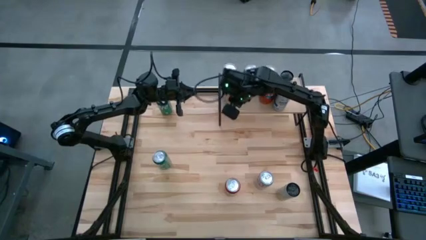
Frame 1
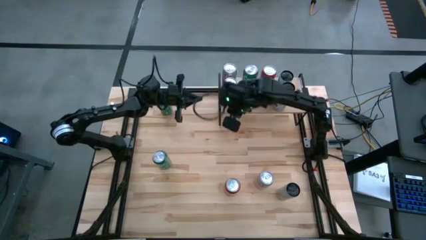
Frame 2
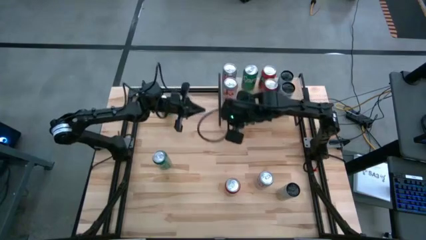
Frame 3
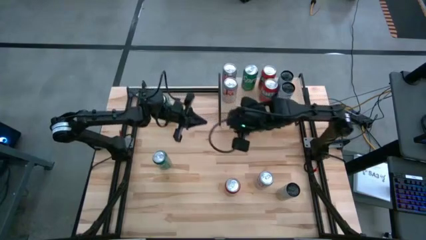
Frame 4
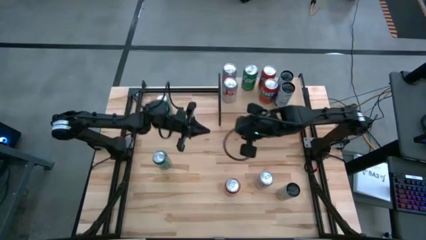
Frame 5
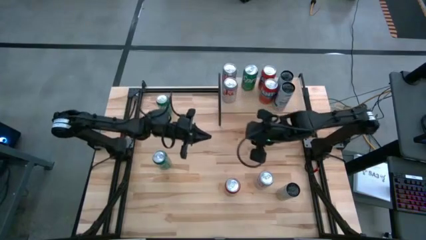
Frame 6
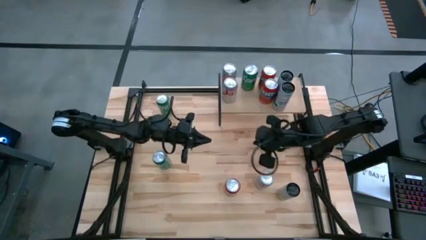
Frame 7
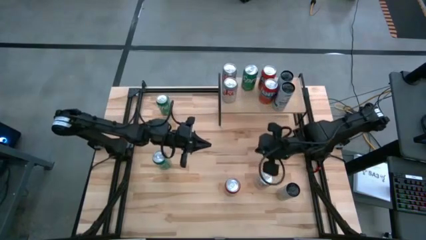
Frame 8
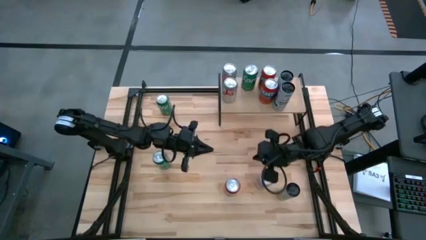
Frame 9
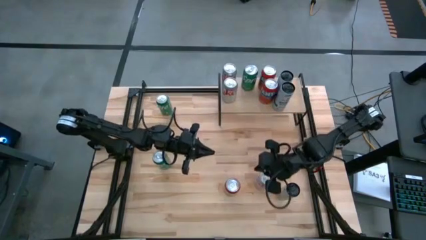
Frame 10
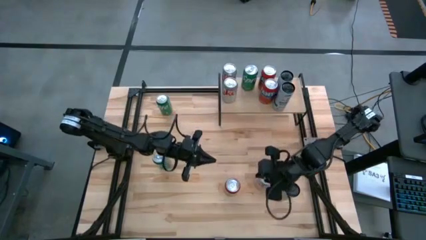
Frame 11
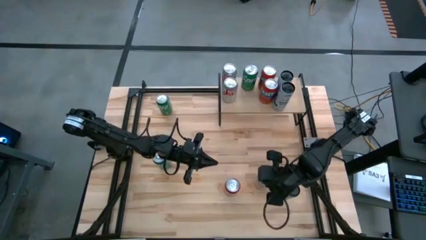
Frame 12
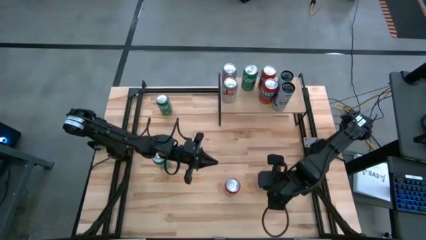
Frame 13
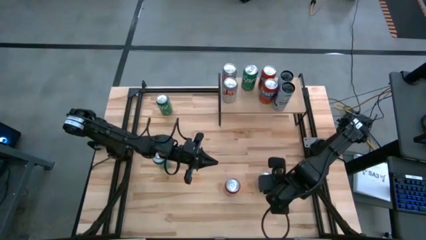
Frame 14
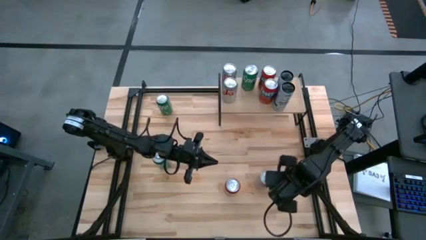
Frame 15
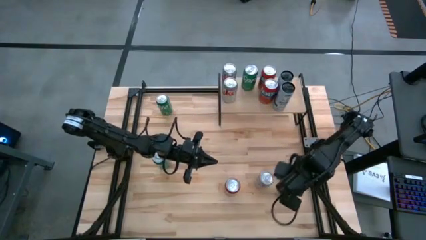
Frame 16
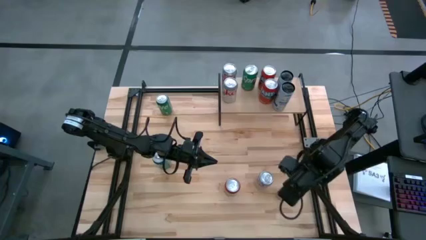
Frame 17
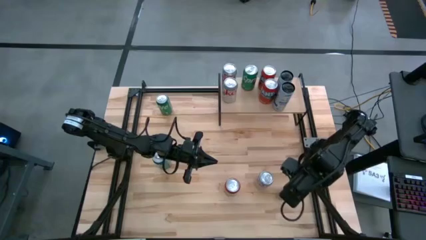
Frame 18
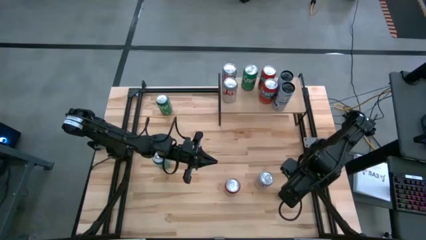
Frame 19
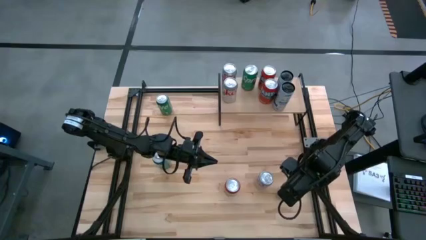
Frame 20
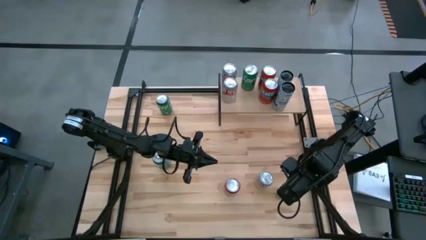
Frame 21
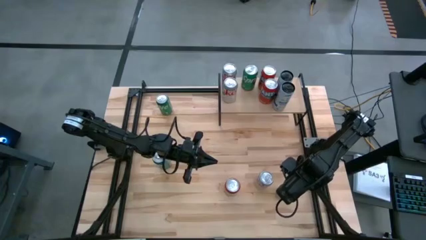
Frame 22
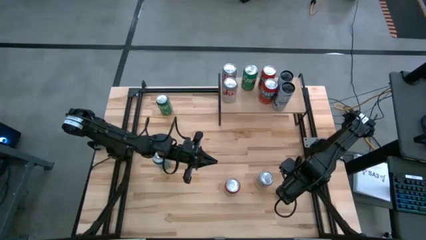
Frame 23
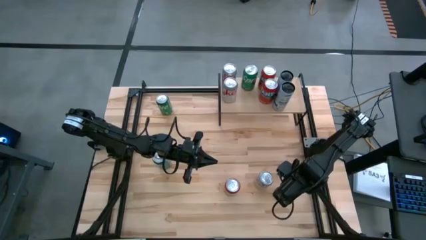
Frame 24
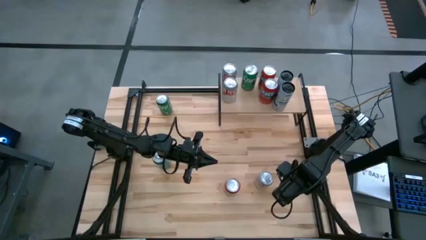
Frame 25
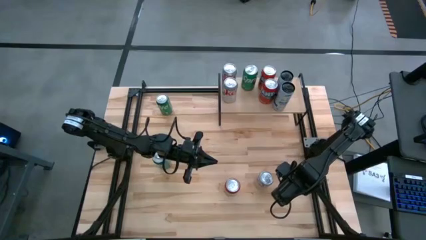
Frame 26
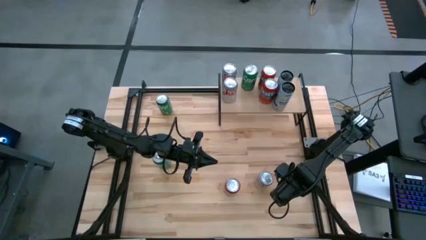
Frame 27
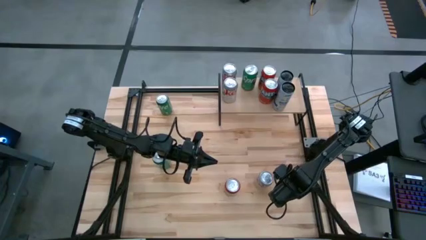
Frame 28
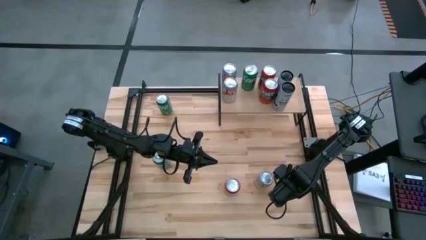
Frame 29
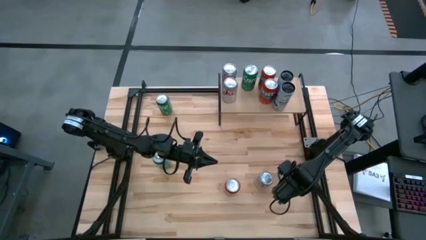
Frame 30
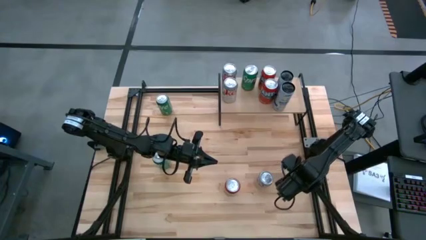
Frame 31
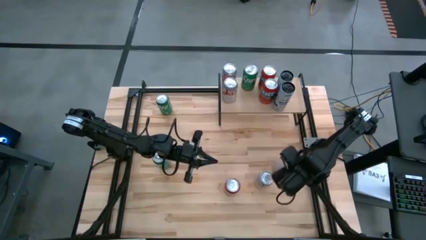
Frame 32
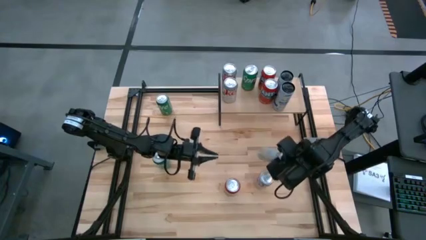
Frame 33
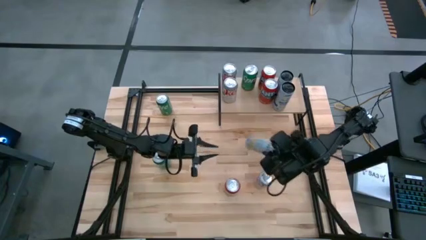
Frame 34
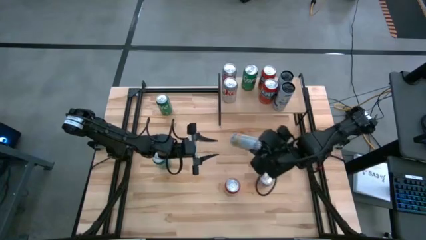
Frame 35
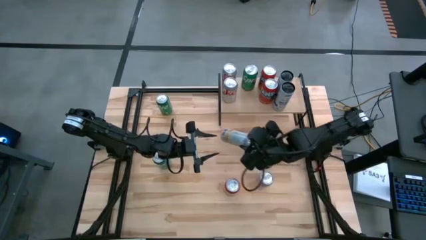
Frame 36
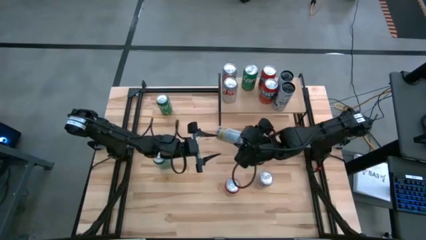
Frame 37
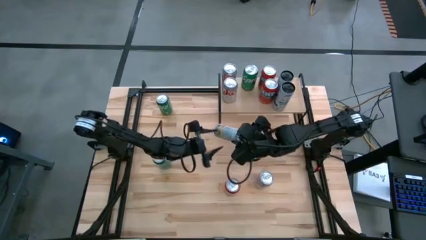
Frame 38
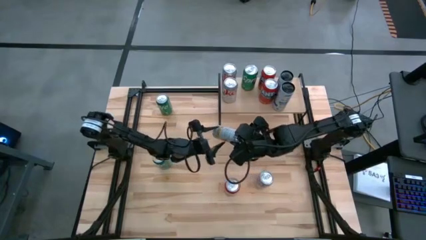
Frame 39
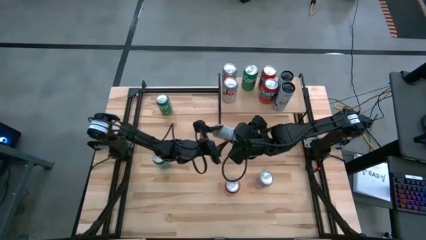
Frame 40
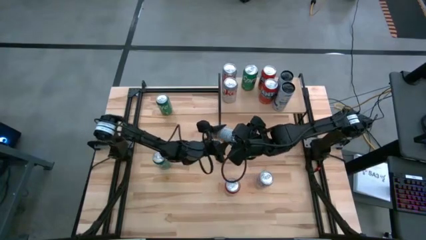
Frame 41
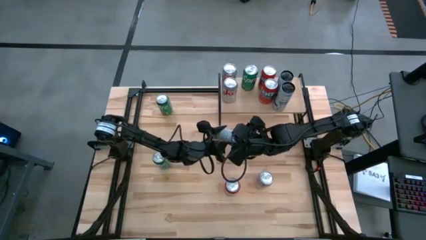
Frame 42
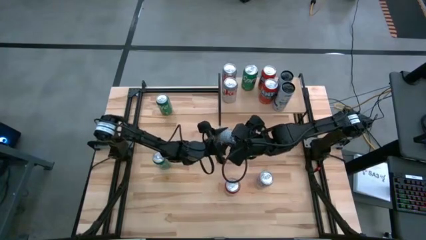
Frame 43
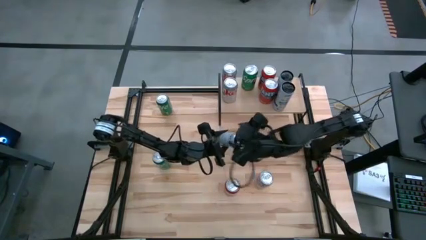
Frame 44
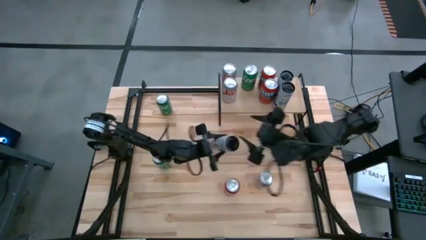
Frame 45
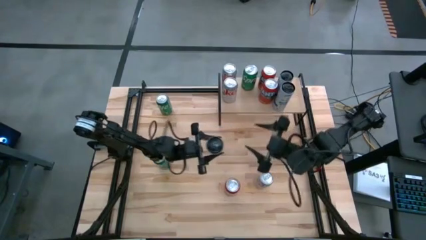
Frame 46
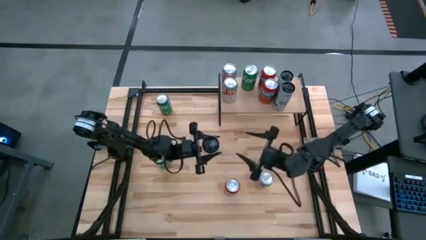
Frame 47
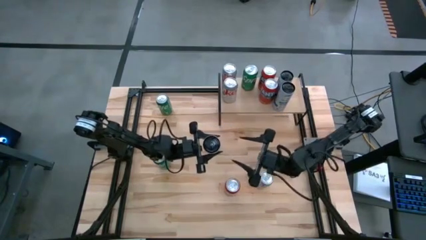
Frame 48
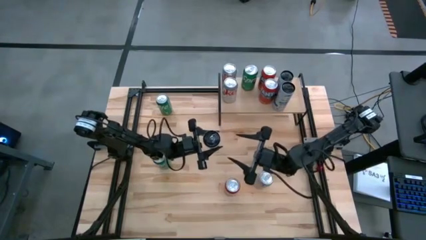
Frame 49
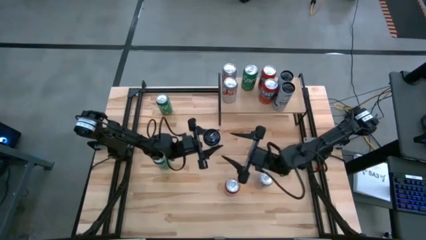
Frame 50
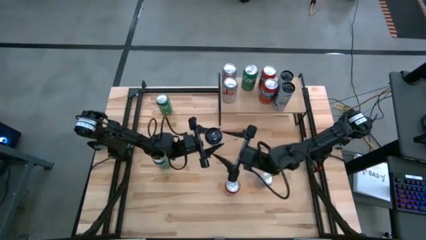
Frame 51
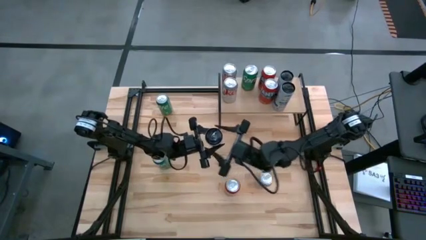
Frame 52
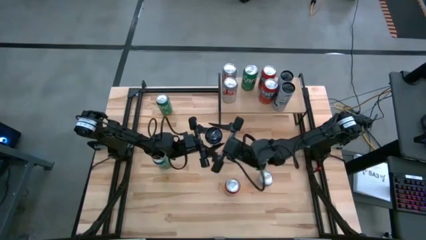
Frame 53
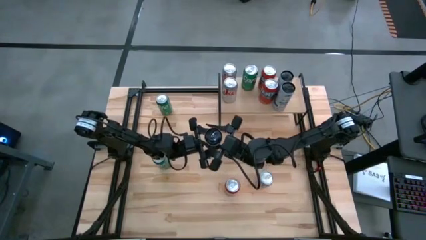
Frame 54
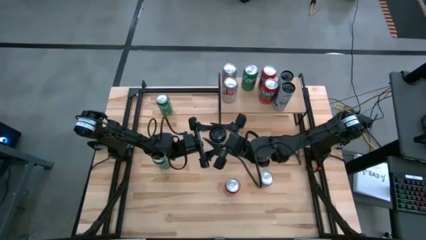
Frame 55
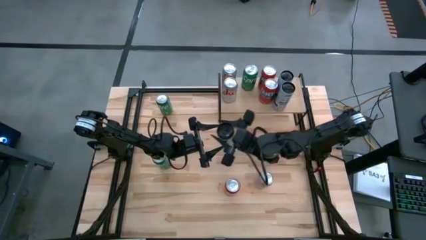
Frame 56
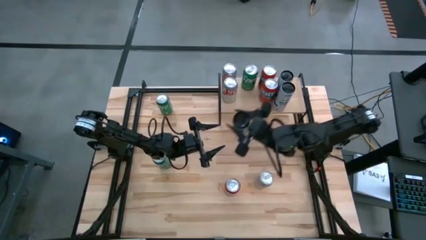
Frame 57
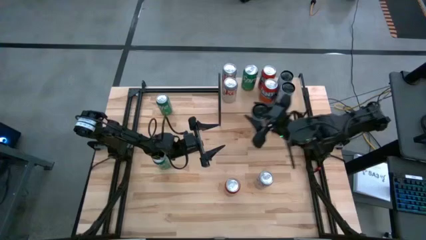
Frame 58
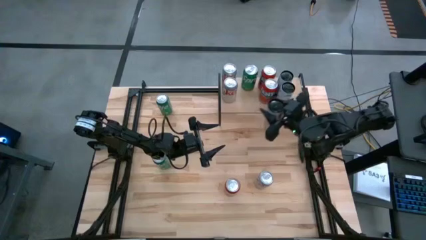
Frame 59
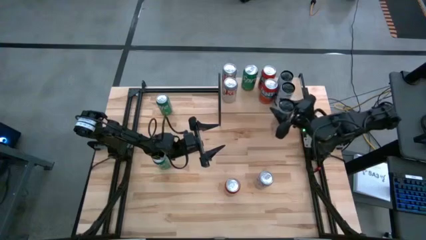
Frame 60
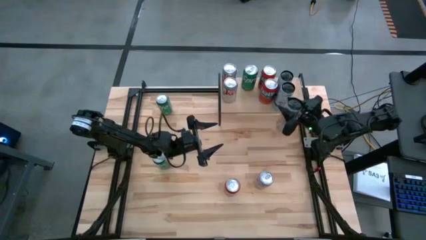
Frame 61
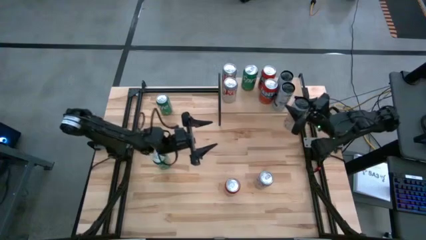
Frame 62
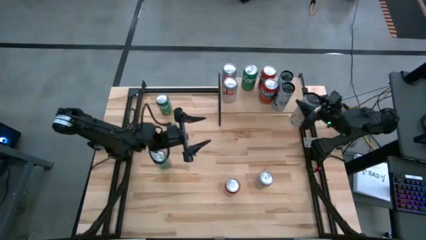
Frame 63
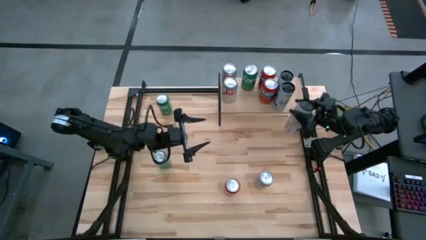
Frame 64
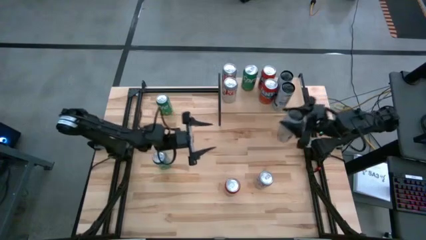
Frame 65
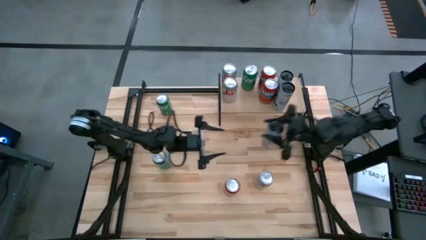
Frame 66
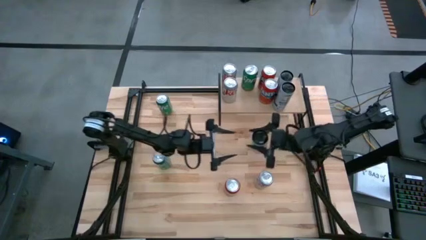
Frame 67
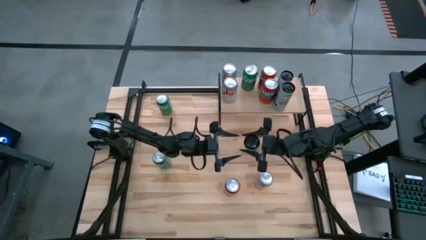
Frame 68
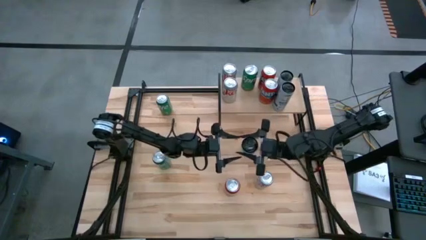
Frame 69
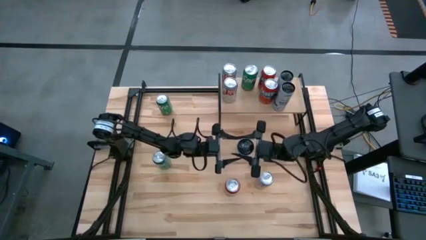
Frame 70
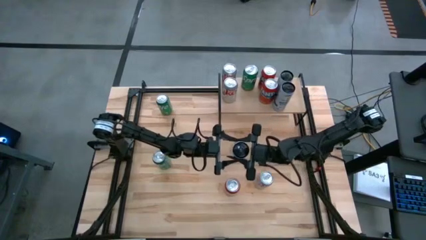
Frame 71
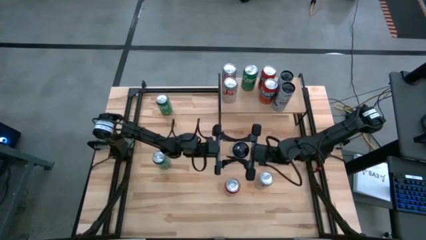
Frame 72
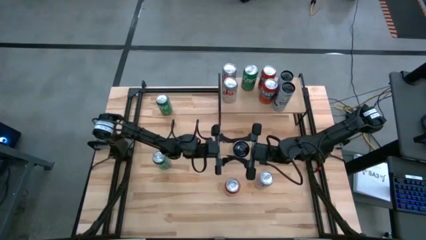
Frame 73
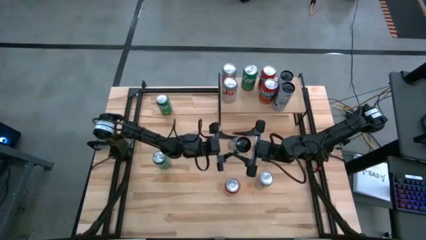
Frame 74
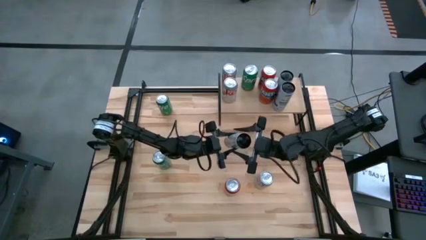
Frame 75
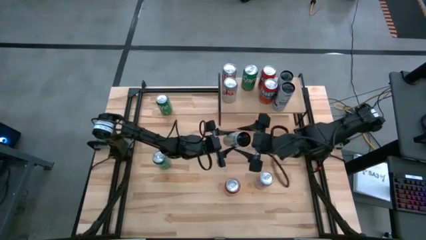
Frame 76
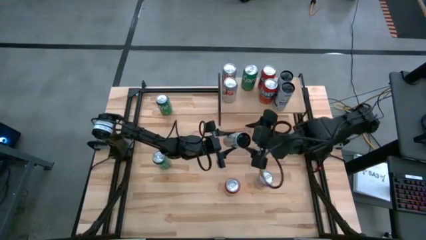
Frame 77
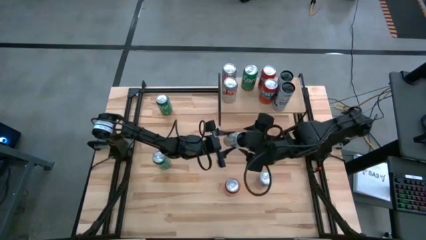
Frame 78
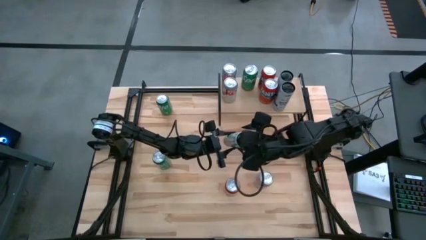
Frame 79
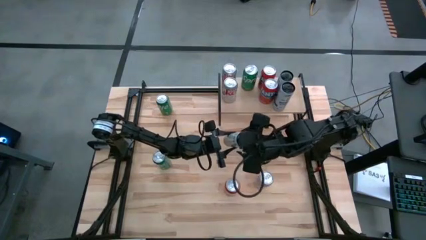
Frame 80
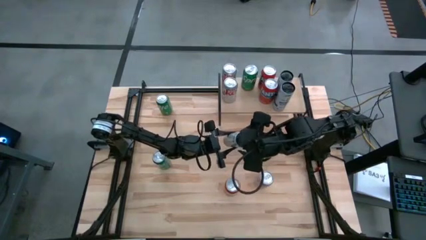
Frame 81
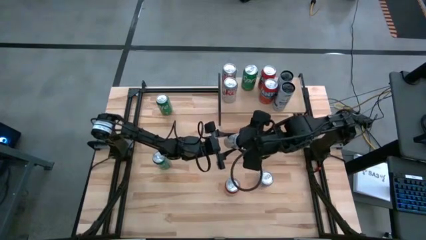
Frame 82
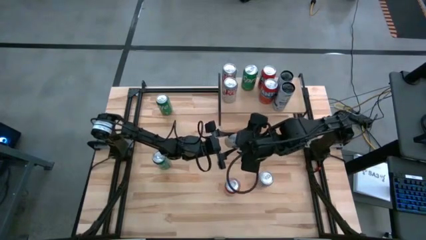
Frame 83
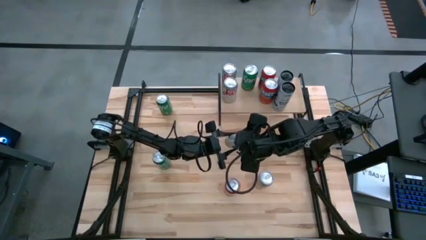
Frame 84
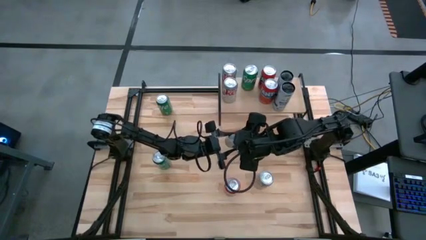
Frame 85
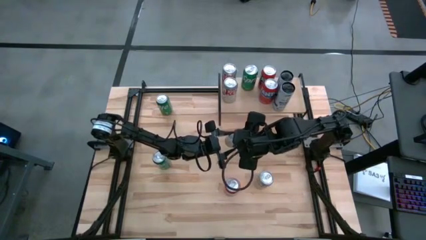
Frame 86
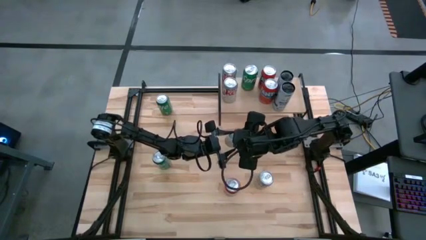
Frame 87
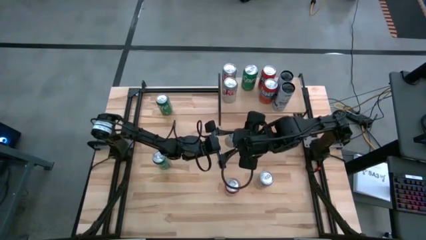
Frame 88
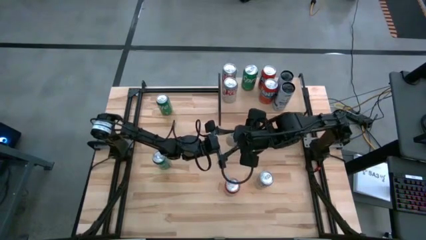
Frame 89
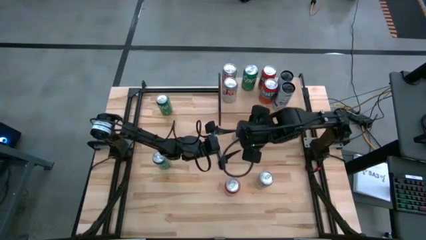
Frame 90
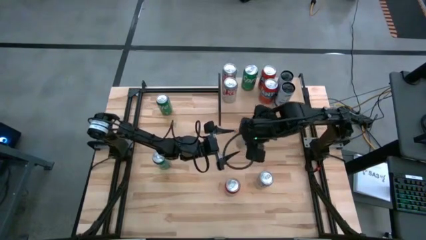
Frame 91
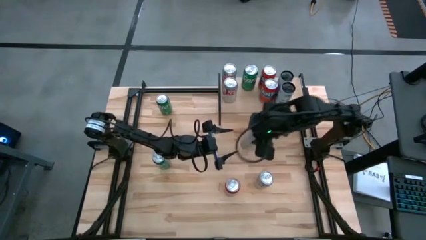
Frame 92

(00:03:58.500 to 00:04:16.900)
Task: Place canned beverage on shelf
Put the white soda can on the shelf aligned to the right of the other silver soda cans
